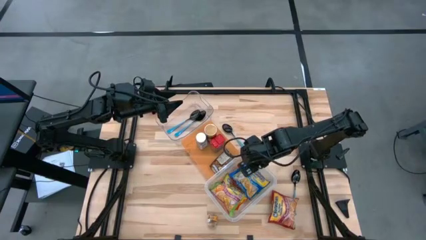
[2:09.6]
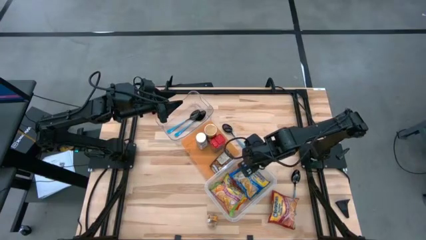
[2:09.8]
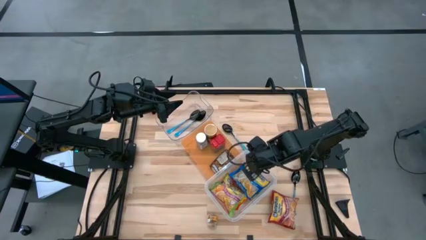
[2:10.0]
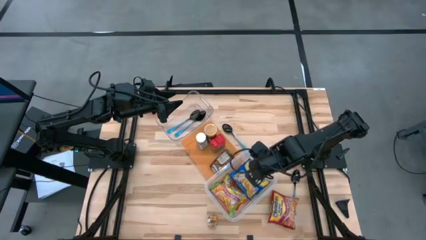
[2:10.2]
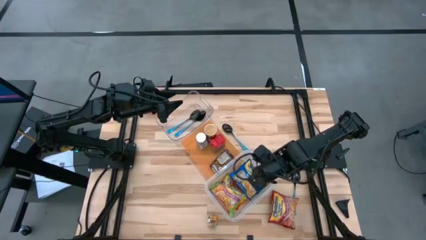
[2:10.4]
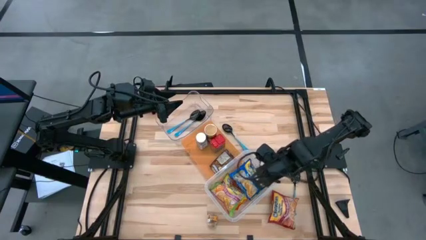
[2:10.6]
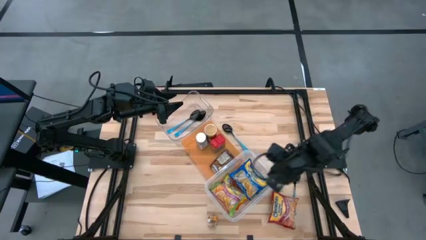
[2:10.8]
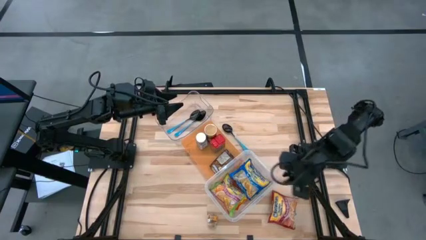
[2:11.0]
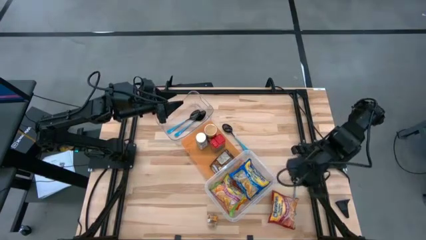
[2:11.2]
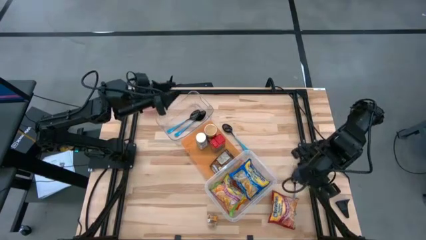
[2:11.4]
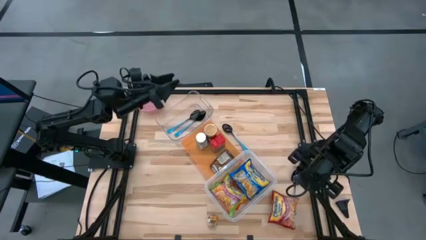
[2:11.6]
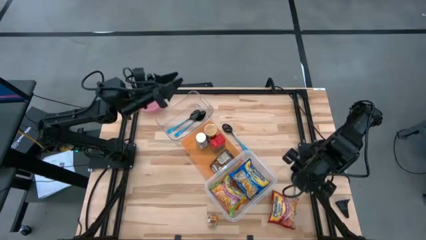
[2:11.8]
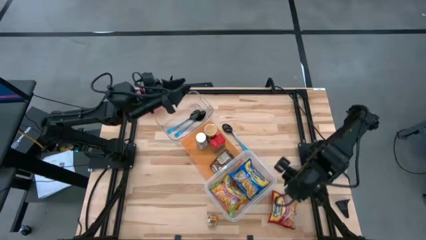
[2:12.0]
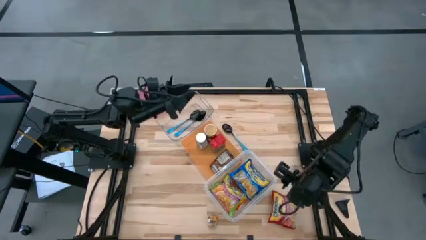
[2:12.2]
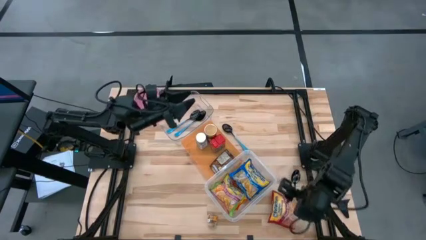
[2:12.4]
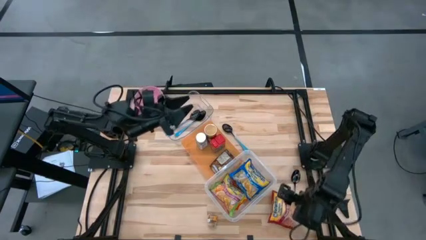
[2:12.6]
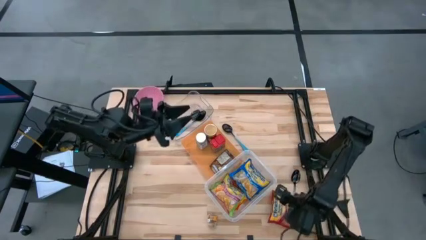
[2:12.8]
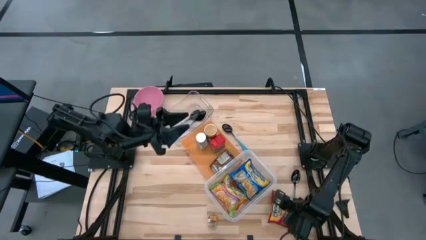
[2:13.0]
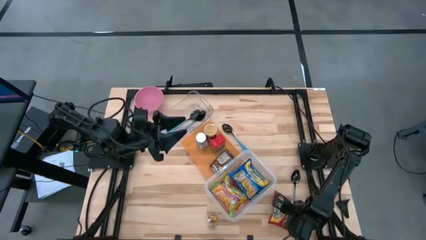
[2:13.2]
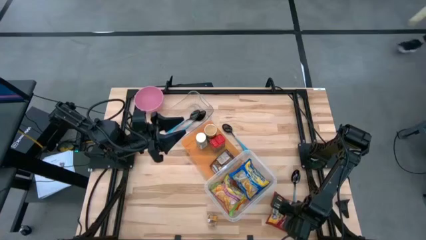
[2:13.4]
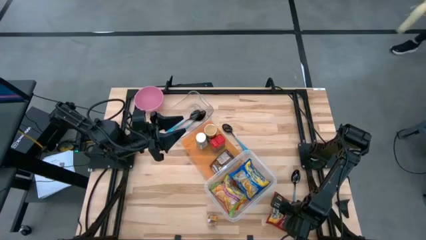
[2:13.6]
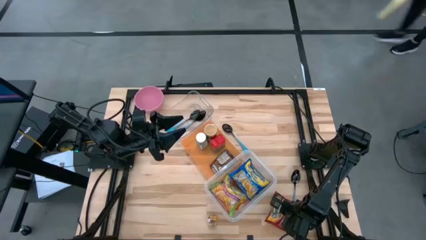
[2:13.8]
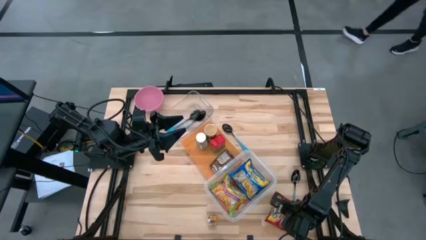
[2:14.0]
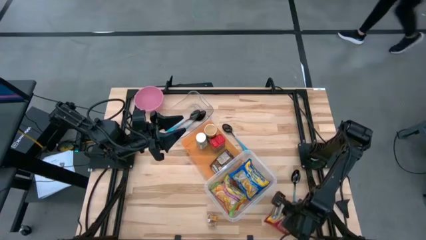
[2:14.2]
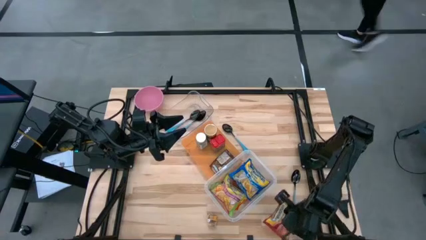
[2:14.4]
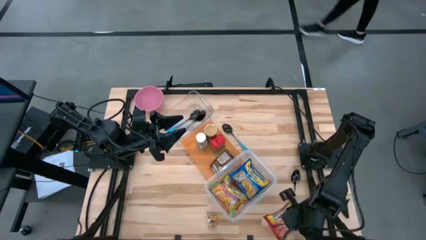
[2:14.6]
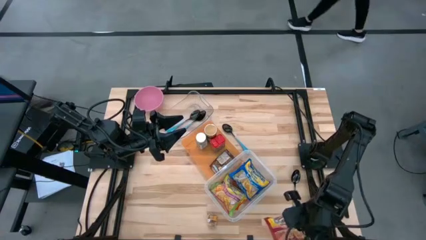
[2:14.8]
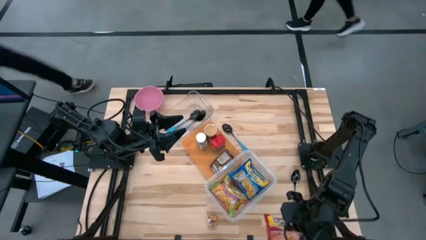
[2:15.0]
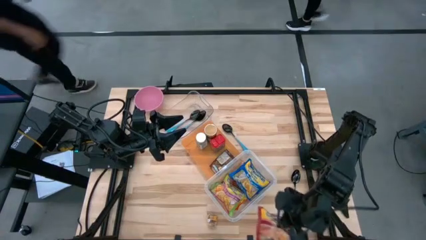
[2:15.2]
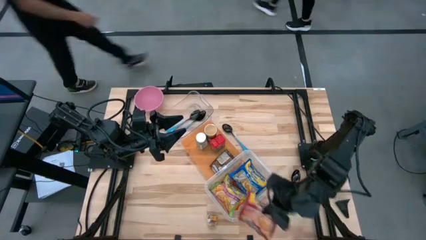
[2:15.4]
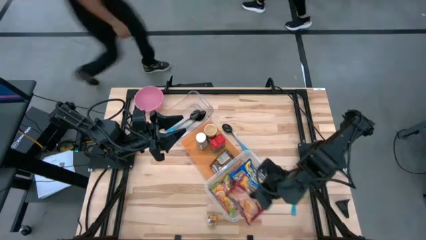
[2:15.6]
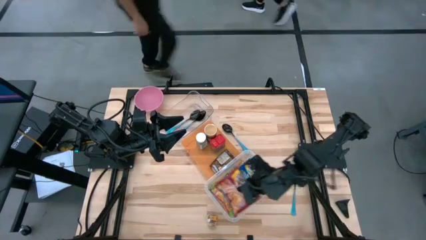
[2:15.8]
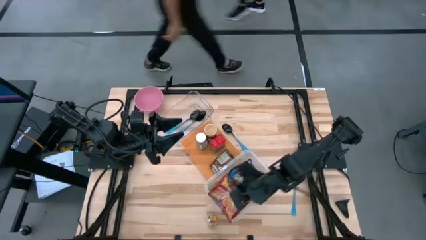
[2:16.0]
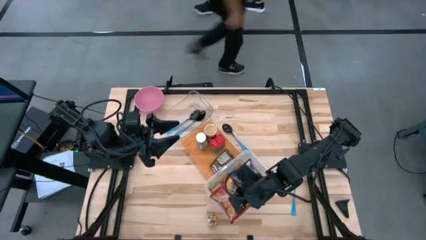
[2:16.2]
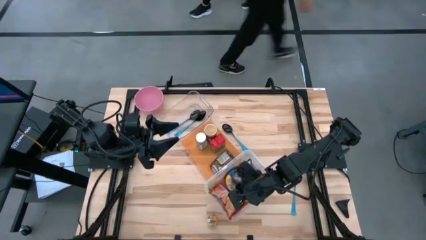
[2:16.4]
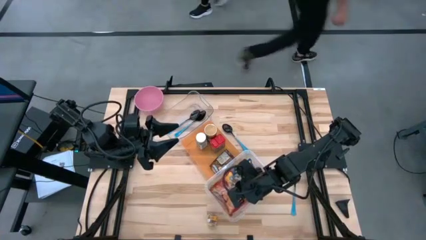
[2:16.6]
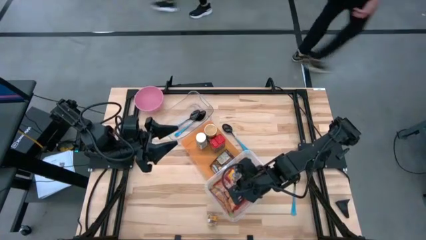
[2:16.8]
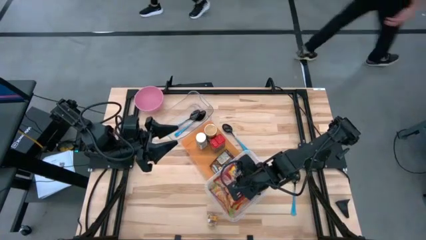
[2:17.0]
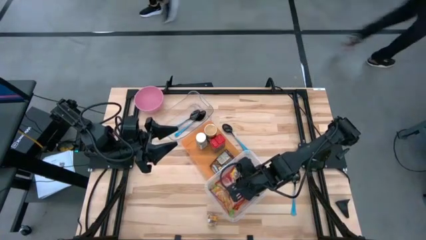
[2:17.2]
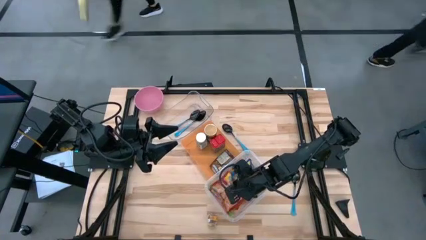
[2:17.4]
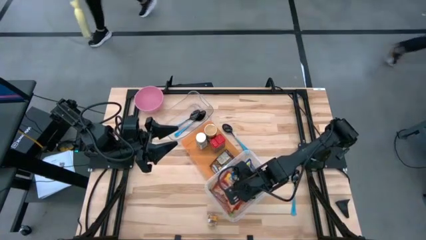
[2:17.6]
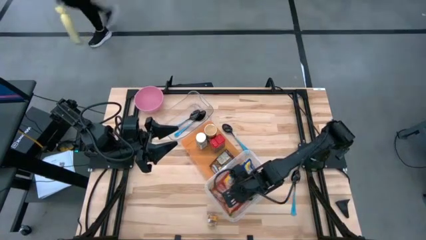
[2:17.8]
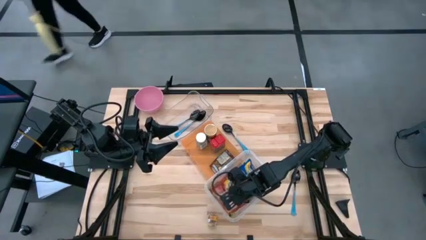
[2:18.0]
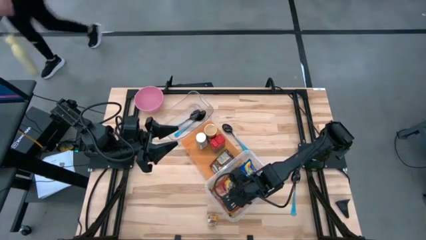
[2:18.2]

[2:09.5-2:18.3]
Task: Pick & Place Food Item
Put the red noodle pack into the bottom transparent bin

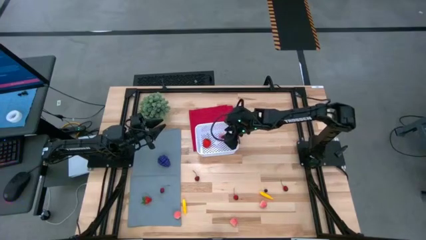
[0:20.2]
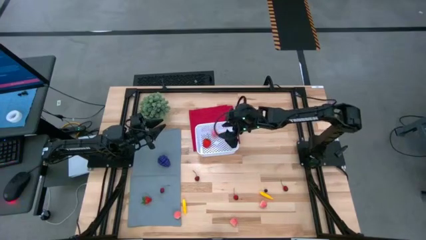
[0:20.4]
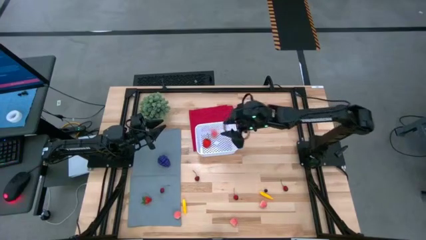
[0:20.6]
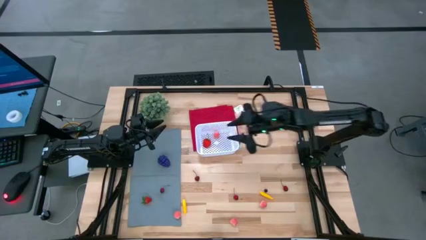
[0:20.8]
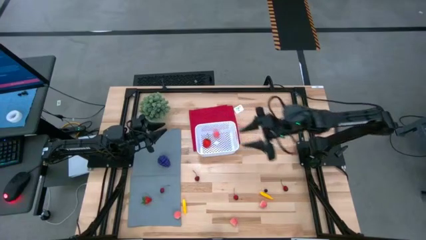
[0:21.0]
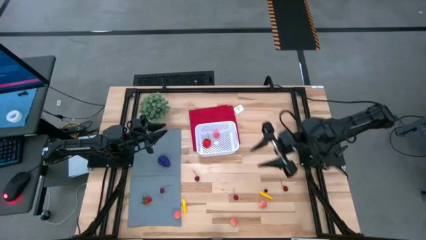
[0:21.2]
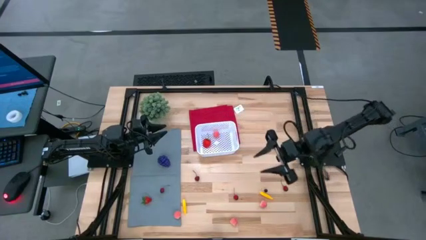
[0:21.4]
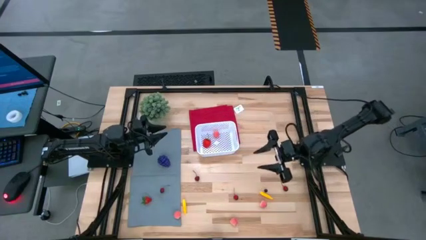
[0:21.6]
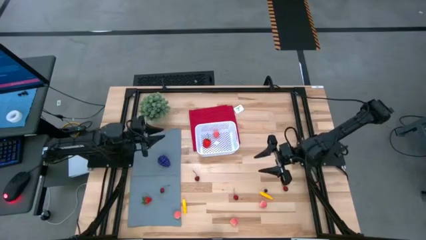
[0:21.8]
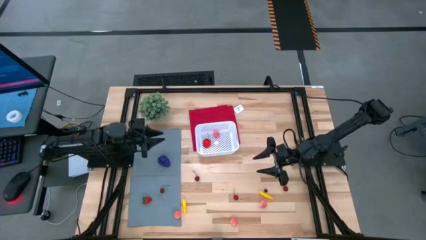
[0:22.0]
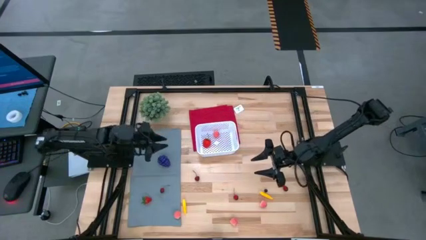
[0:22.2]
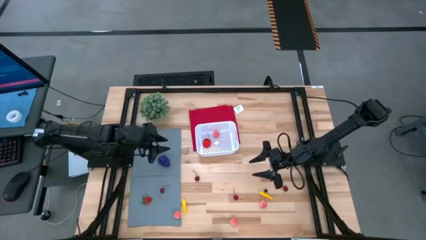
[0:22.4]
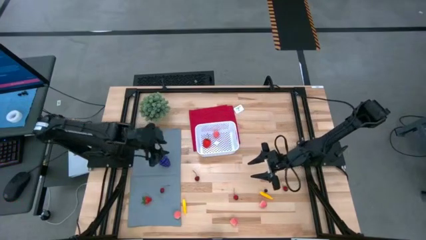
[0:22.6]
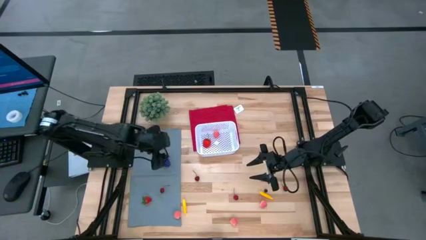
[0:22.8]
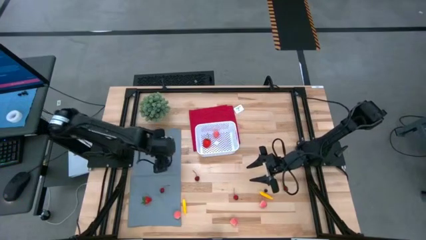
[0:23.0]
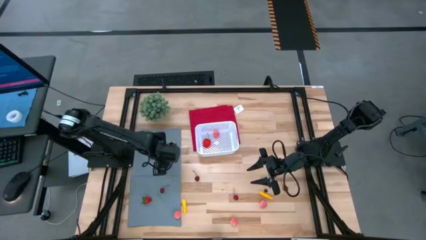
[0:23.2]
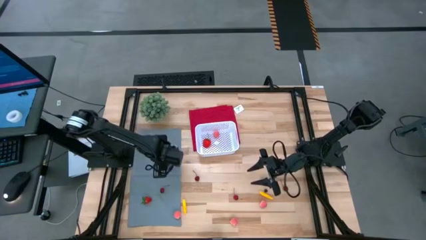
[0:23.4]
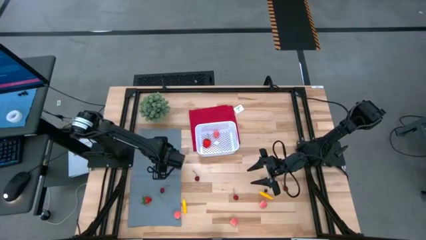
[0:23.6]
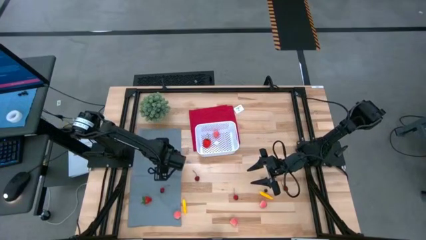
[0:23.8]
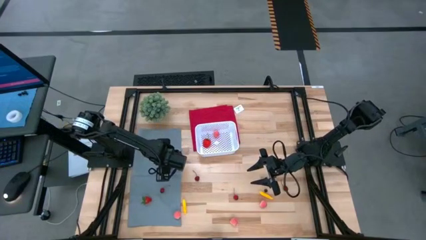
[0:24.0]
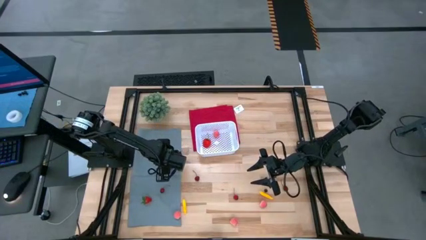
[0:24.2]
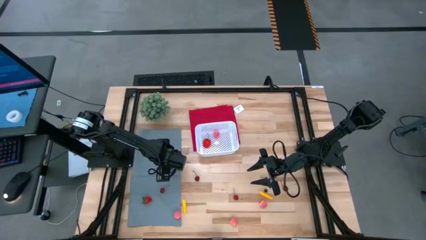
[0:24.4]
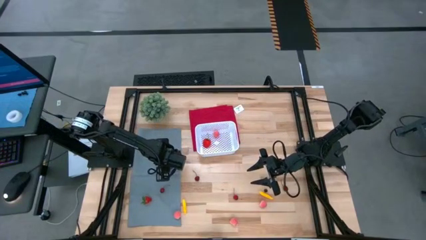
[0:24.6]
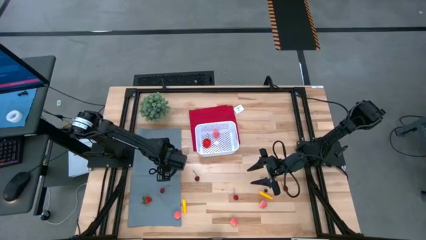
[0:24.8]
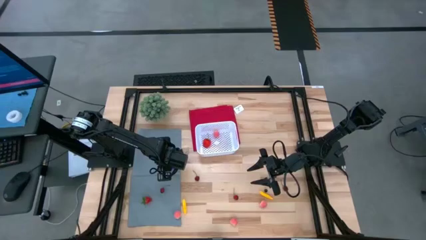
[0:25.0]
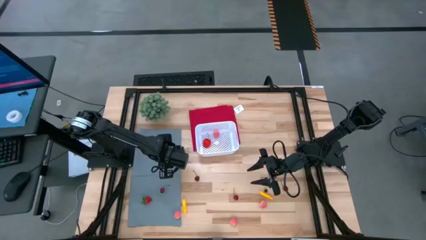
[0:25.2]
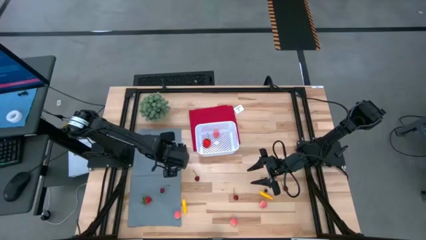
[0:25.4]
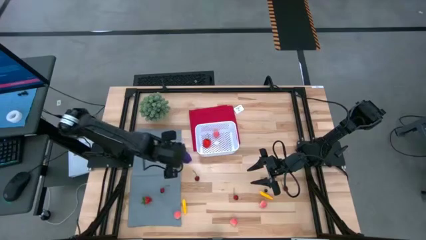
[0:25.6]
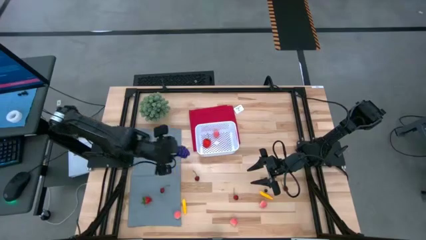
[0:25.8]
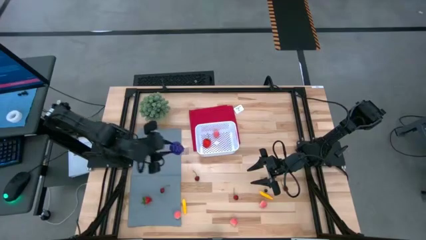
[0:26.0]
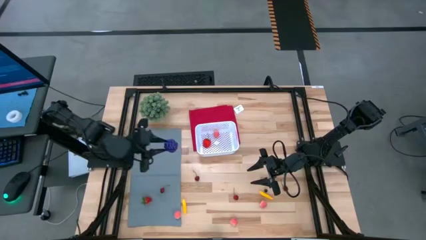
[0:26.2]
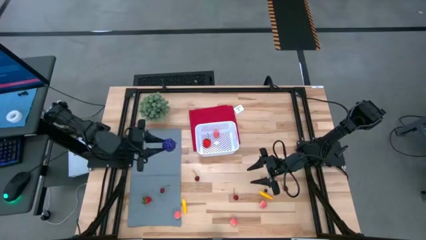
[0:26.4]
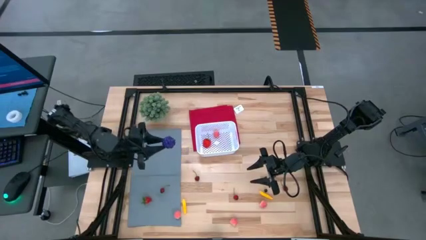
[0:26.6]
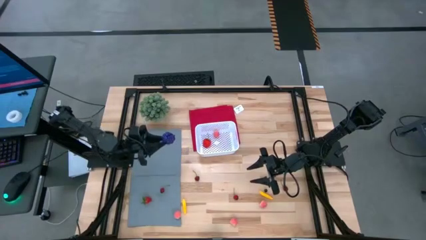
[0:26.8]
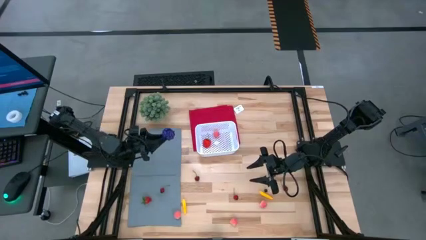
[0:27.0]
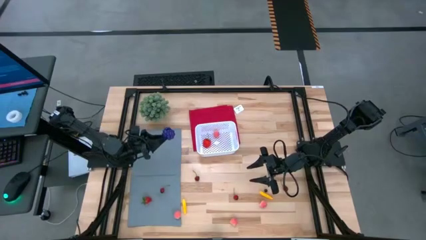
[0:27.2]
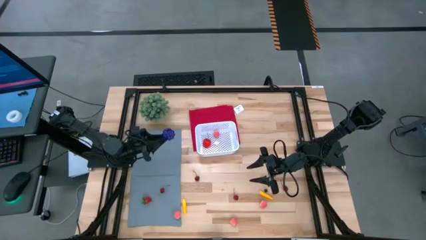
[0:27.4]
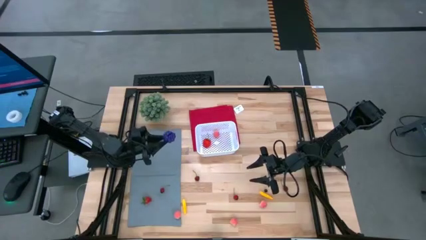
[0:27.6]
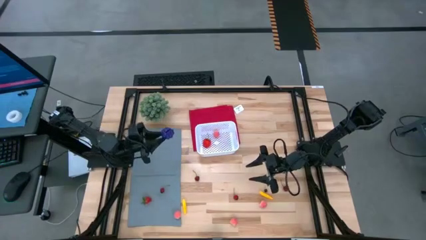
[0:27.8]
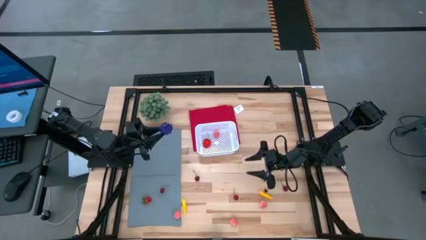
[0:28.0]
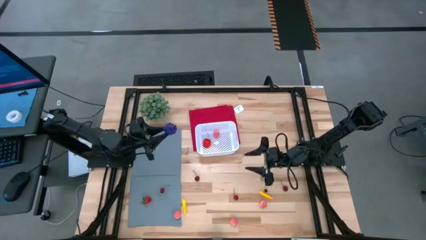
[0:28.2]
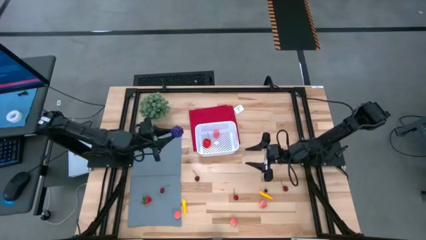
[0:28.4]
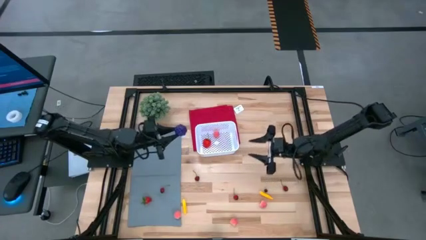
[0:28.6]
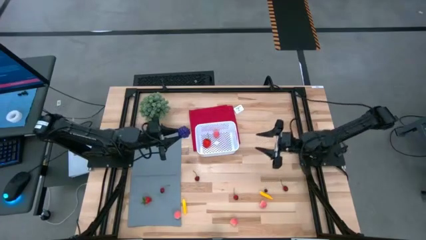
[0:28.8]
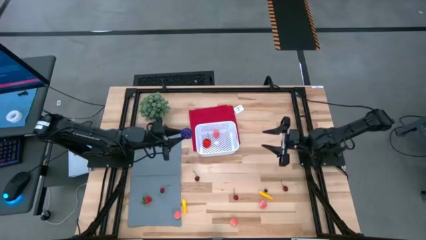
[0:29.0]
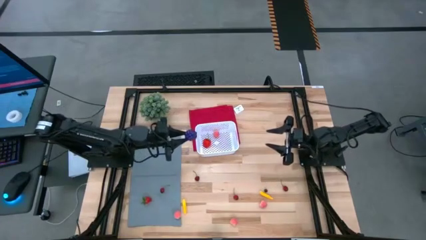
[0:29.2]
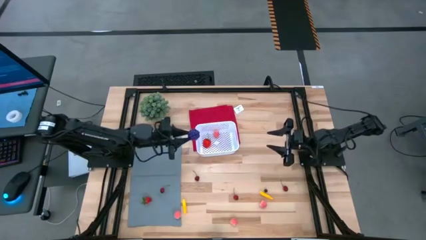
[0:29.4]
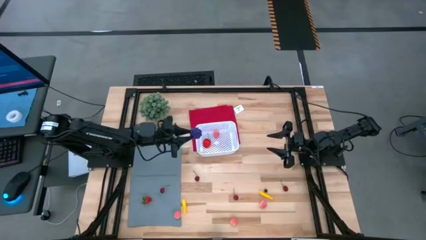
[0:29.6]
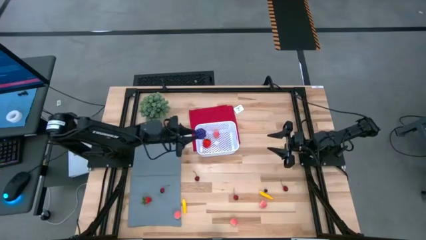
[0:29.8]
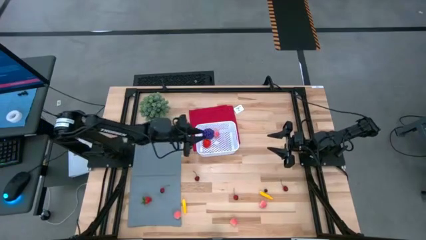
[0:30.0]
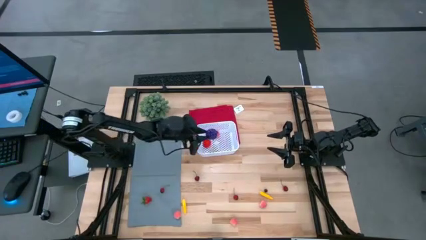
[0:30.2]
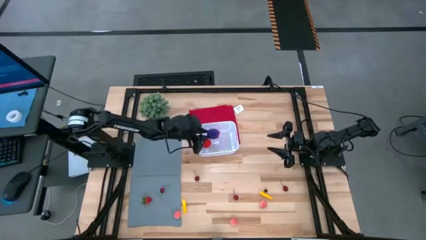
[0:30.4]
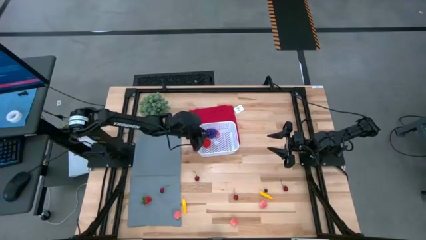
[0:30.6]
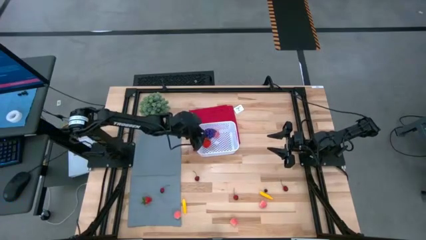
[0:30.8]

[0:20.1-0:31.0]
Task: Pick and placing Produce into tupperware
Put the blackberry into the white bin
